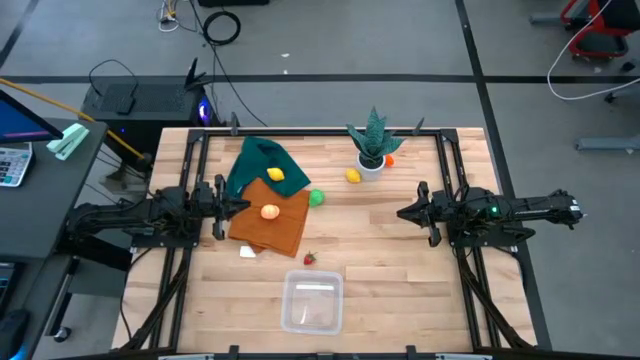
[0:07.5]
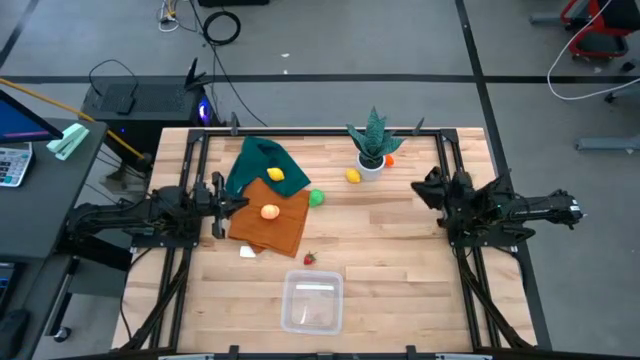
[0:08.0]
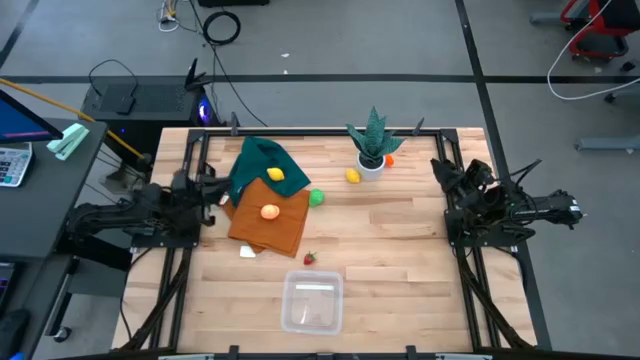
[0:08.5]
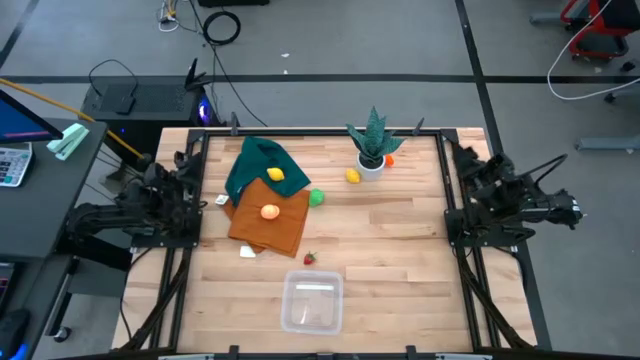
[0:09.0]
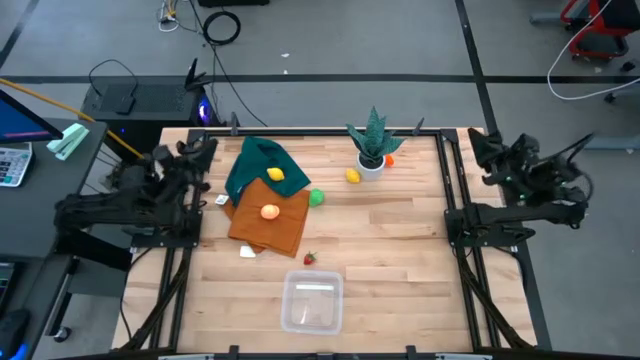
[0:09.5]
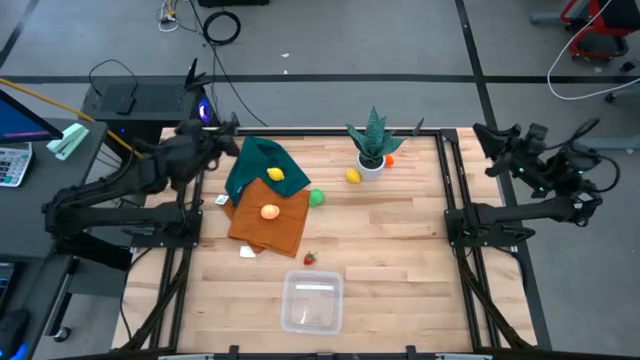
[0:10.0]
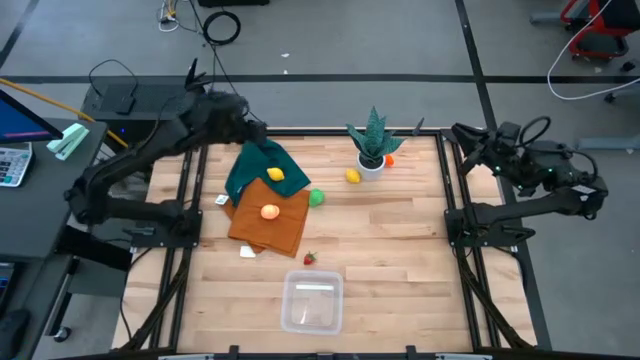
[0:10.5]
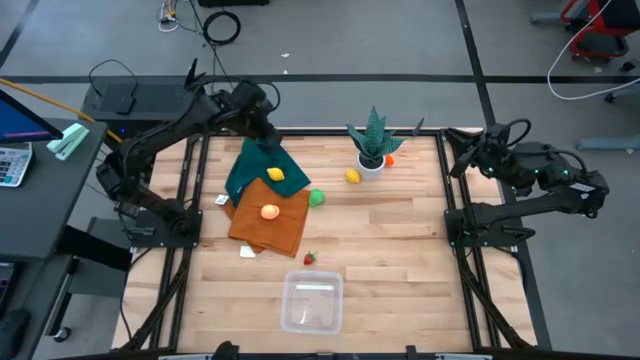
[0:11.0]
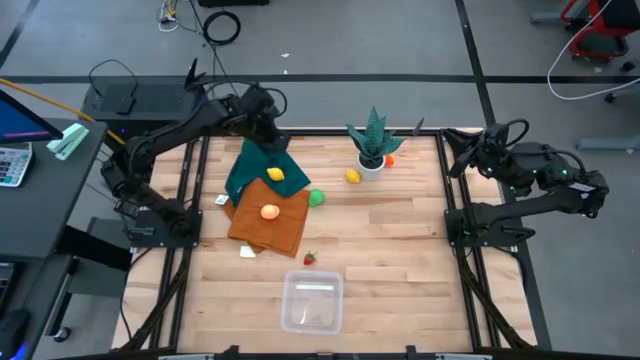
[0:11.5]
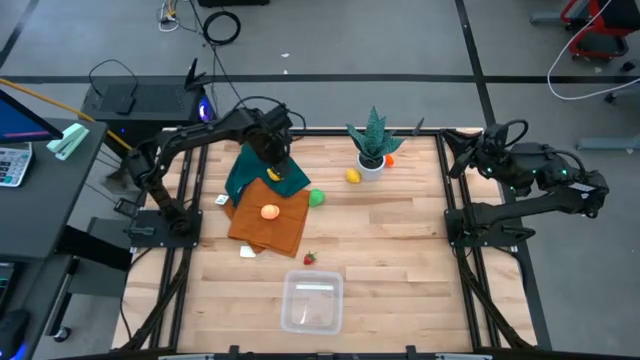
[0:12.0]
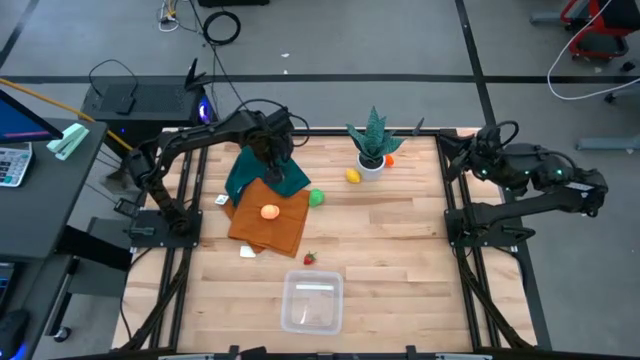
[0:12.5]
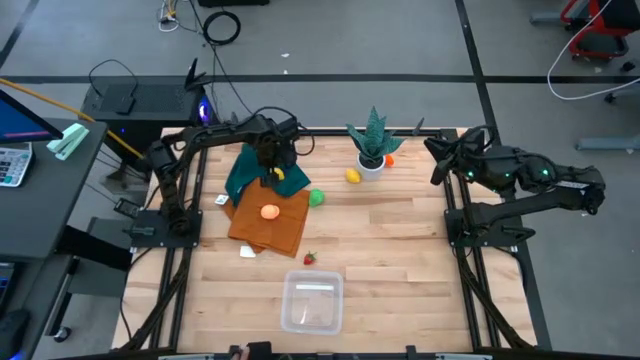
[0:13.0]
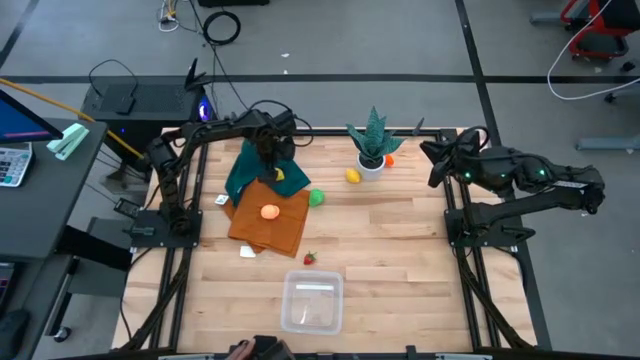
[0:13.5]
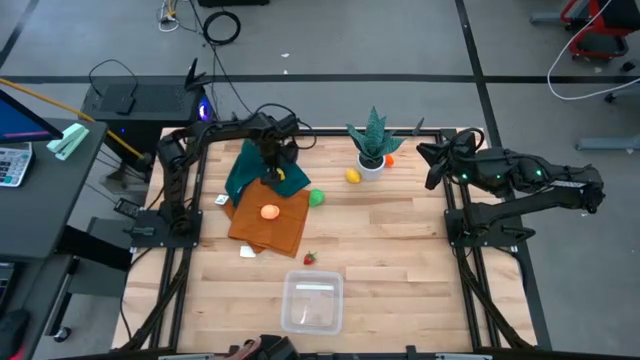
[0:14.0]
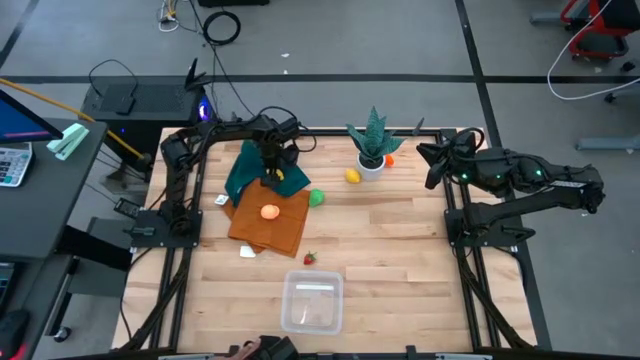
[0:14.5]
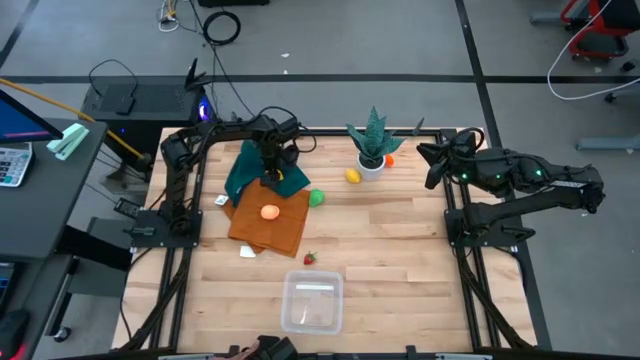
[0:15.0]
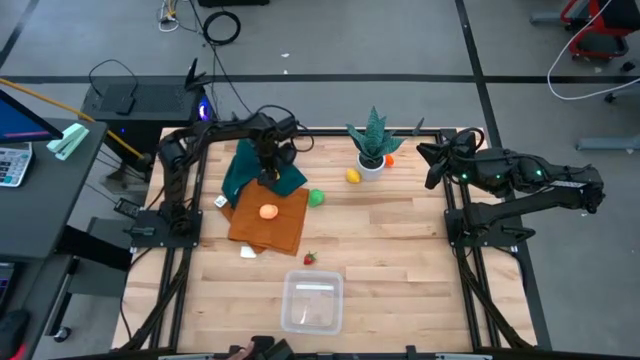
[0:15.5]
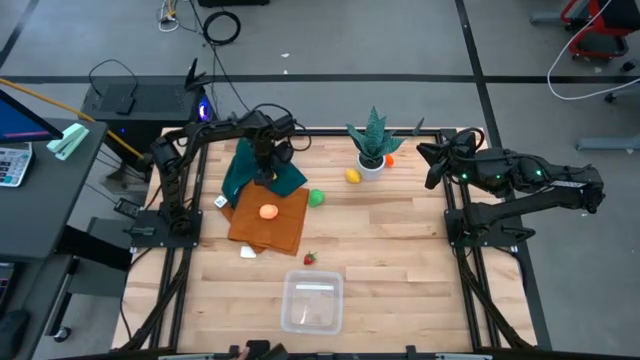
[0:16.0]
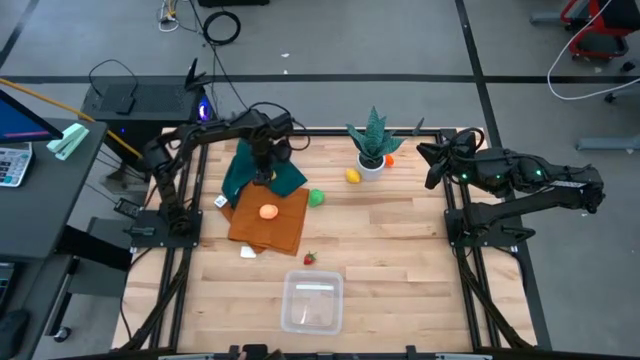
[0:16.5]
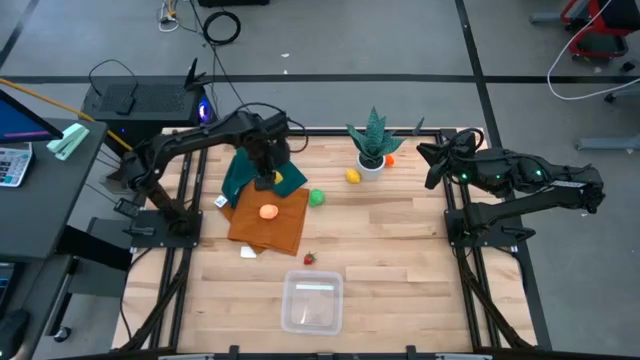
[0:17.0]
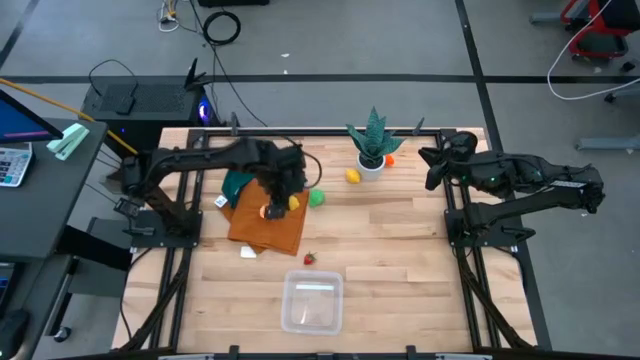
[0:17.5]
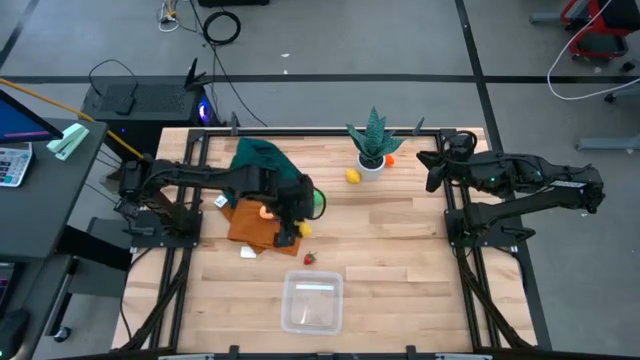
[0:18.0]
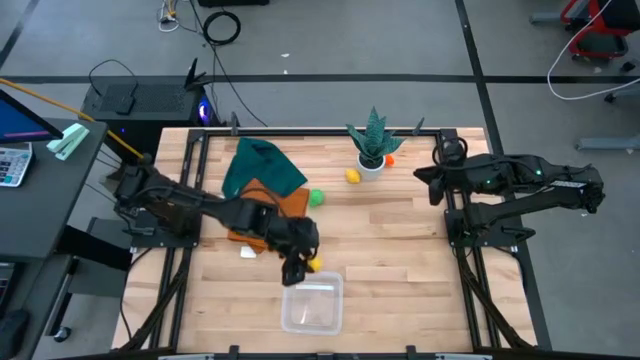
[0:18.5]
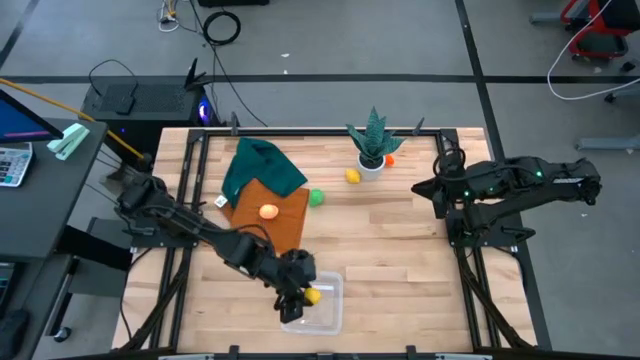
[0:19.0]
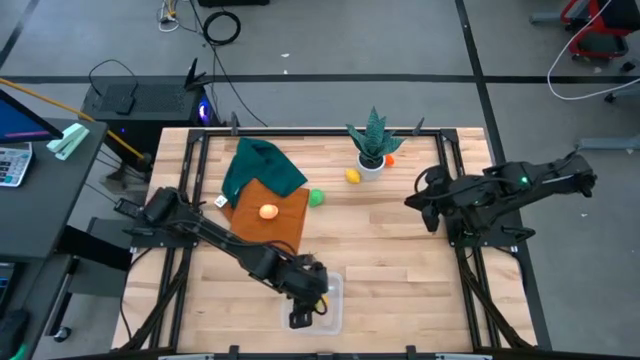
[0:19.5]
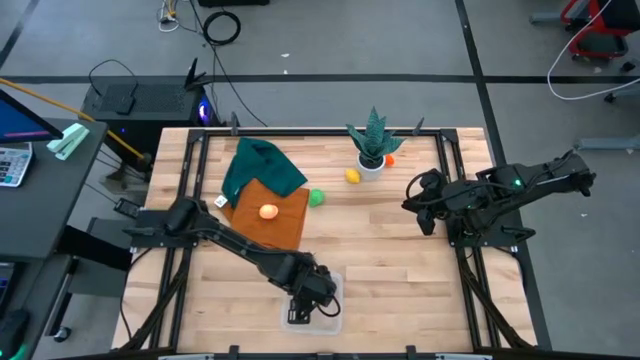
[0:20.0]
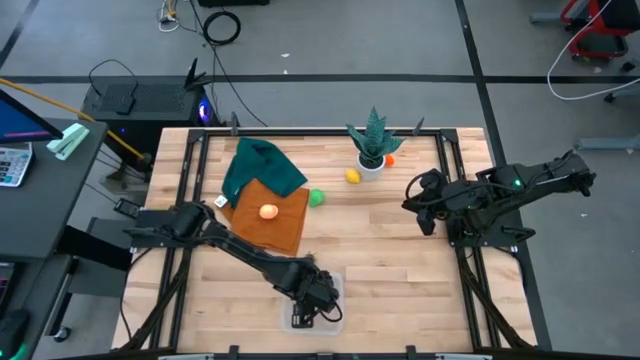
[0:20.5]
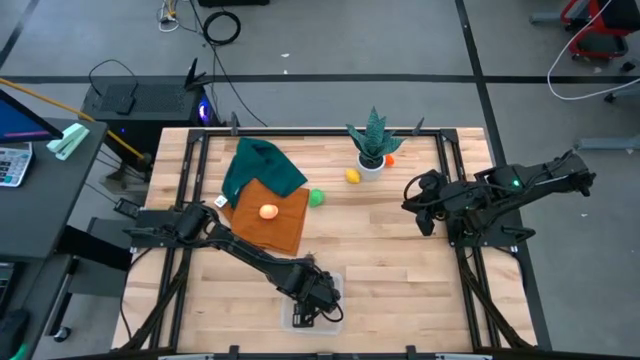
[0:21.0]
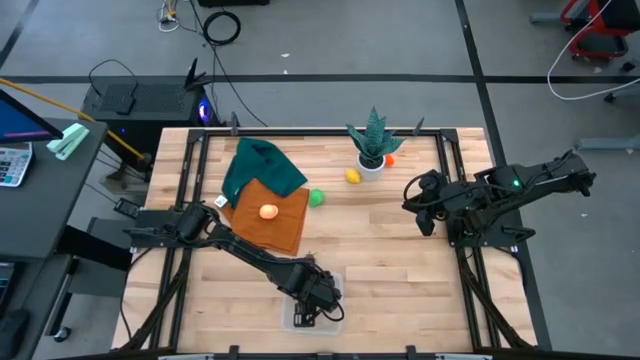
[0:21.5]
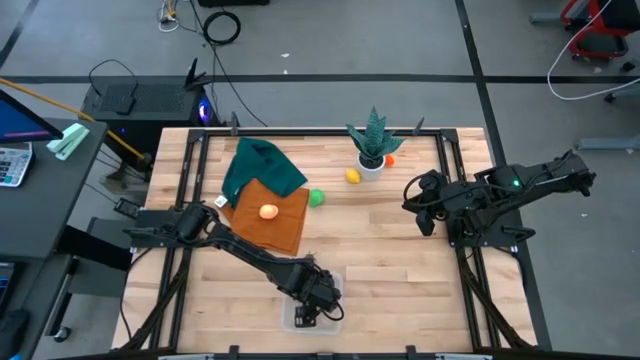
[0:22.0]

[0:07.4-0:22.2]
Task: Pick and placing Produce into tupperware
Put the left yellow lemon into the transparent bin

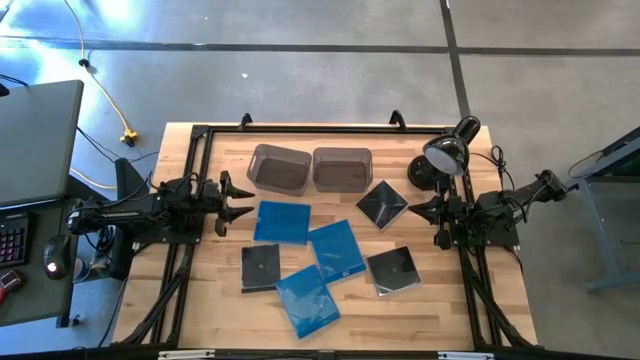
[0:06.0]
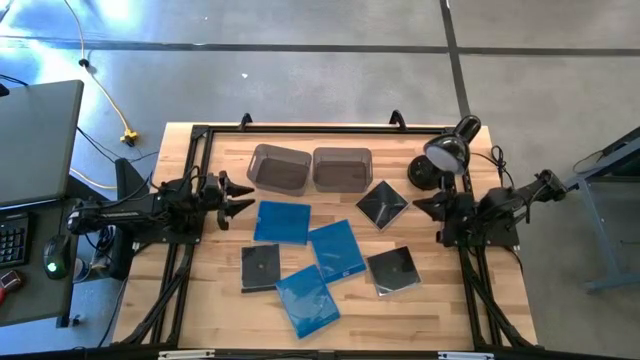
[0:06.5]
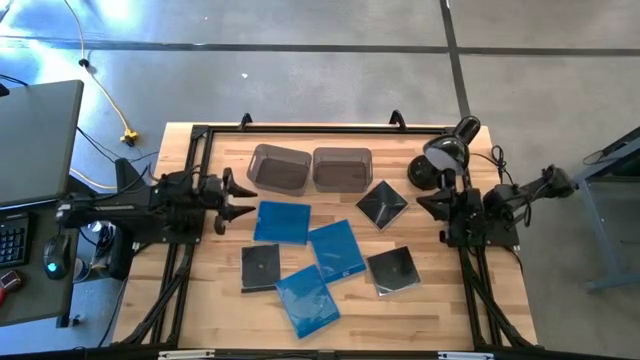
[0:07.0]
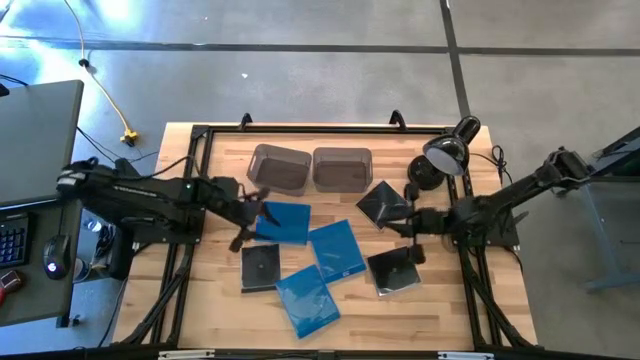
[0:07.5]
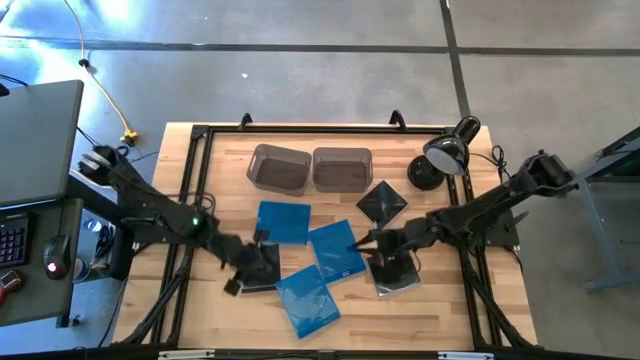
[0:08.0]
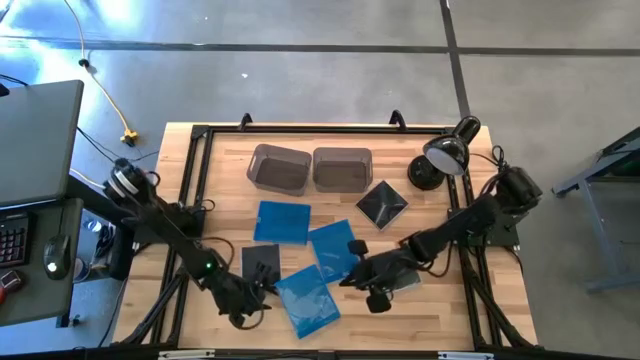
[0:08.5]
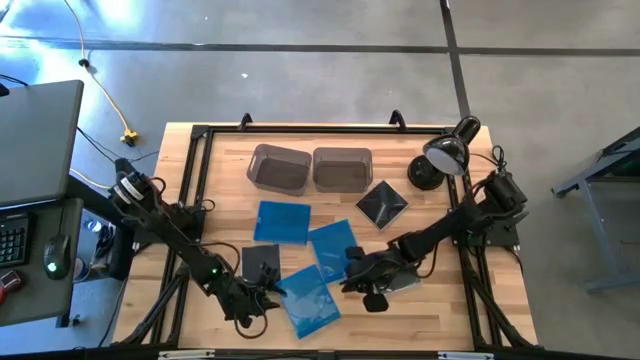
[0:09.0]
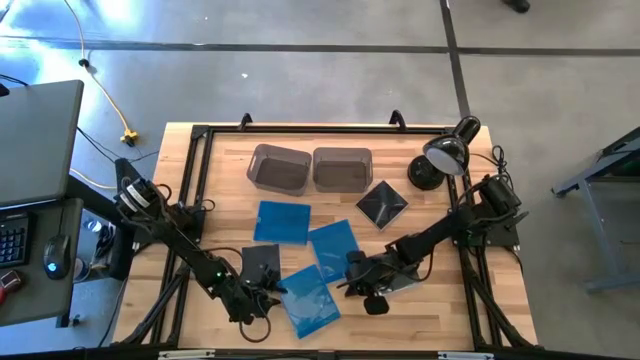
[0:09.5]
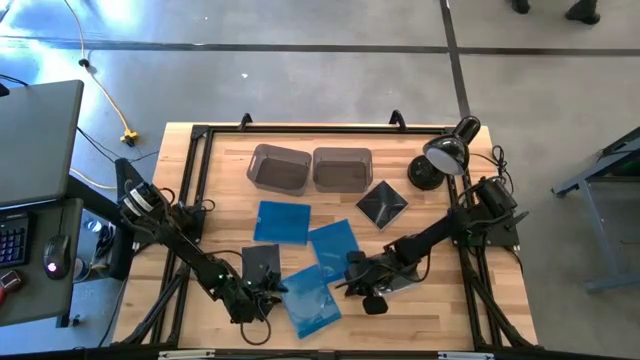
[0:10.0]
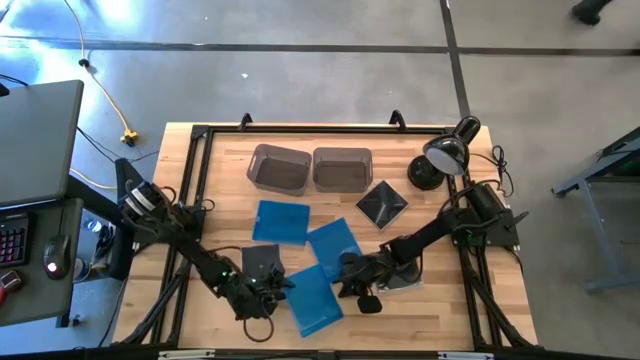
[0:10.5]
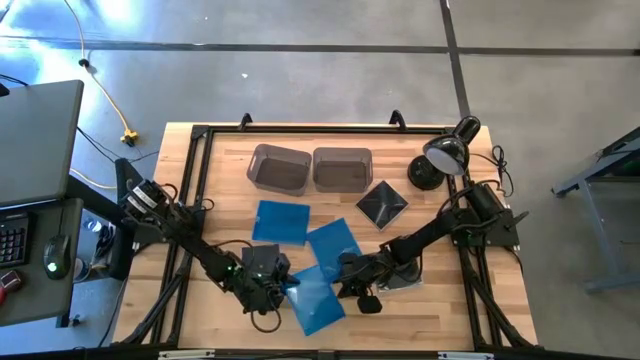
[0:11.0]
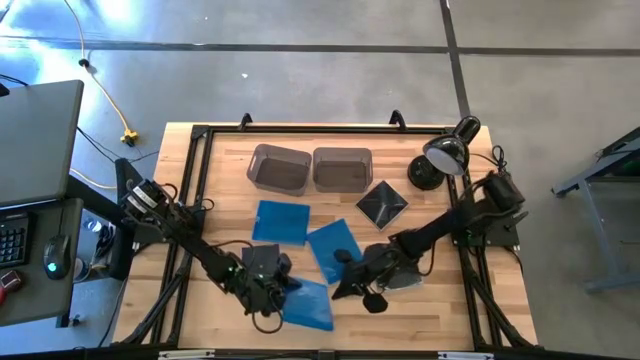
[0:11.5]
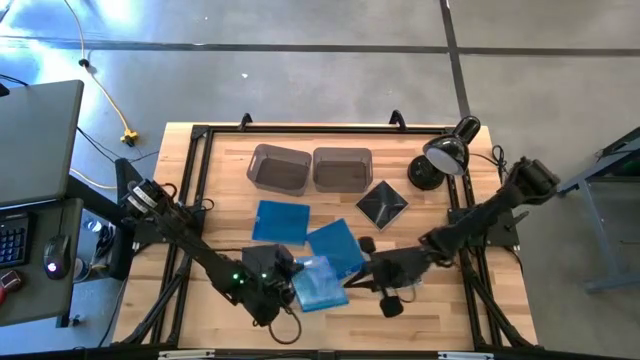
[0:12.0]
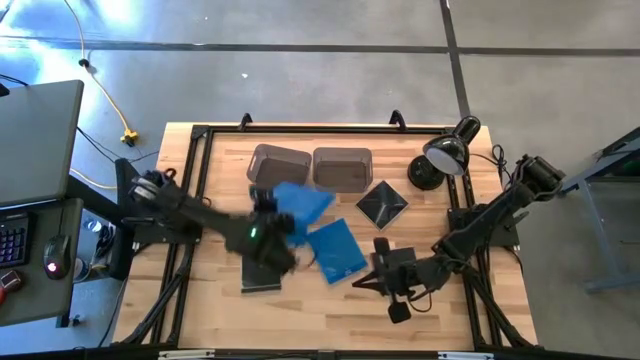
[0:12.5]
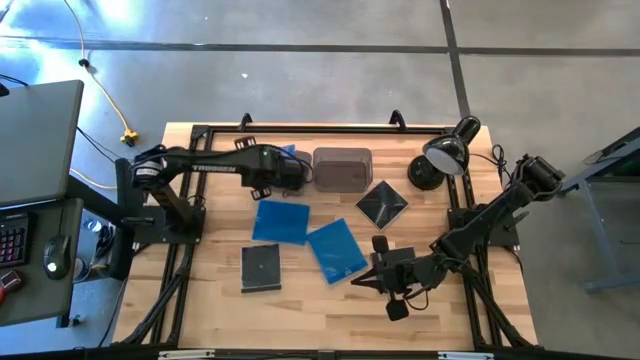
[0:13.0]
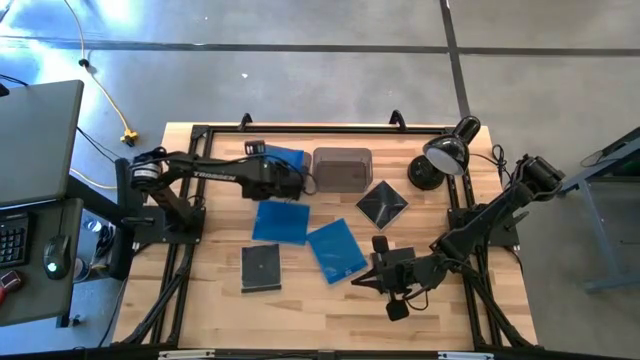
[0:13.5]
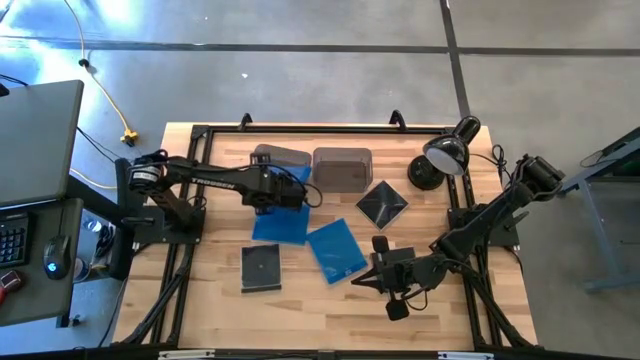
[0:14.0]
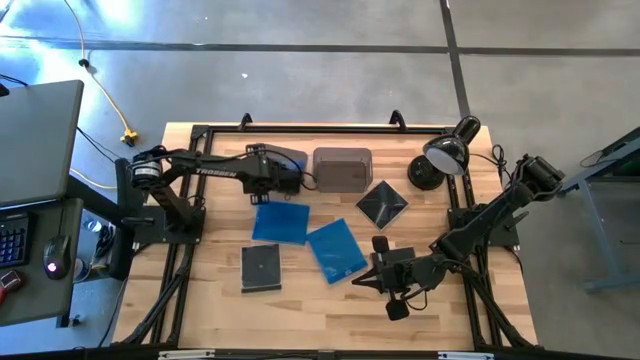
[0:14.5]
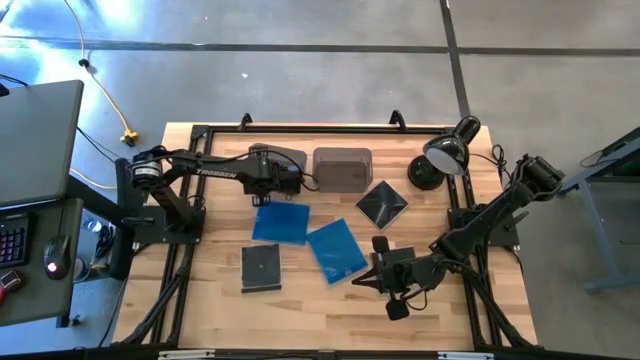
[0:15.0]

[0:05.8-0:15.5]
Task: Pick & place jewel cases by type
Put the bottom left blue CD case into the left black bin
